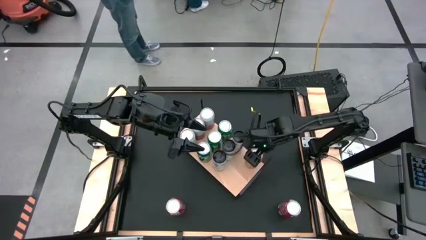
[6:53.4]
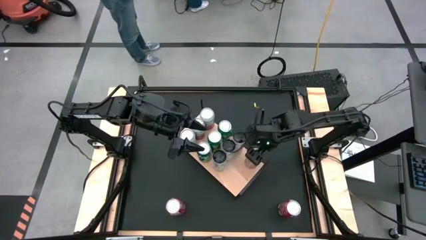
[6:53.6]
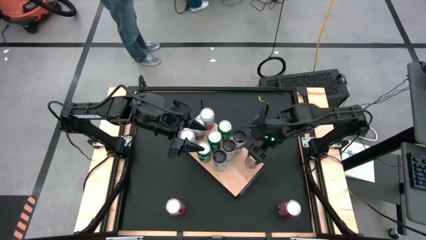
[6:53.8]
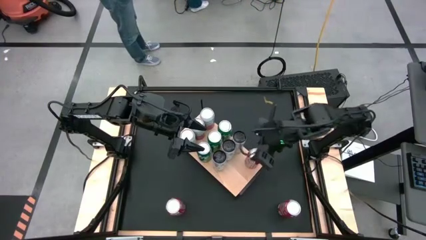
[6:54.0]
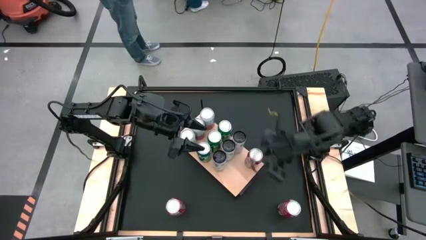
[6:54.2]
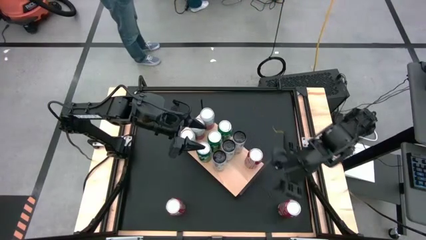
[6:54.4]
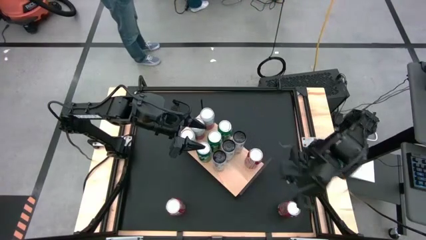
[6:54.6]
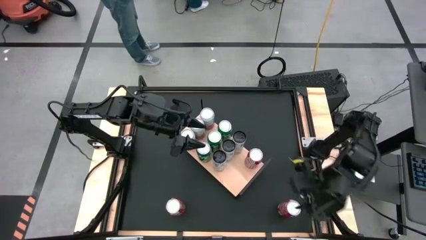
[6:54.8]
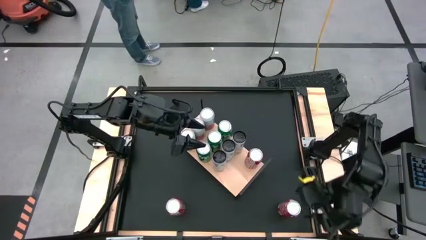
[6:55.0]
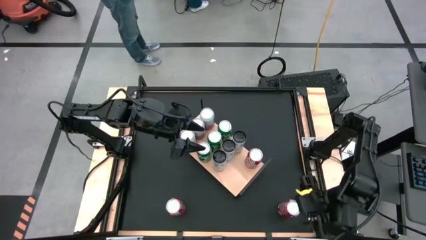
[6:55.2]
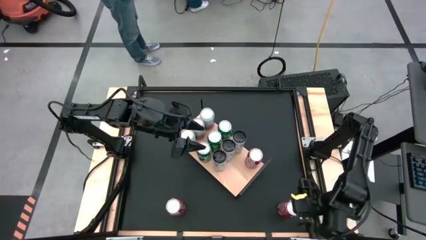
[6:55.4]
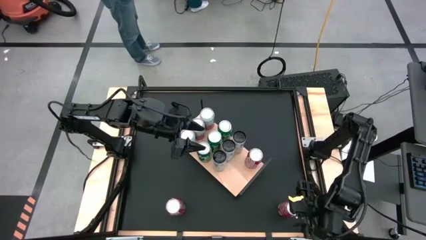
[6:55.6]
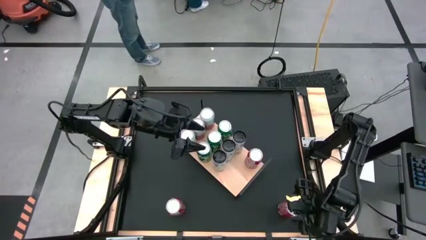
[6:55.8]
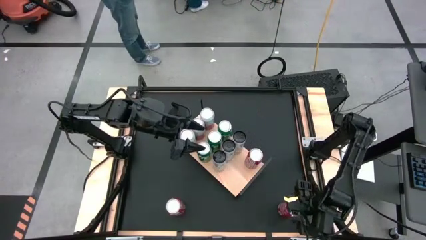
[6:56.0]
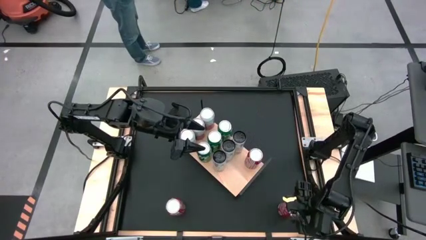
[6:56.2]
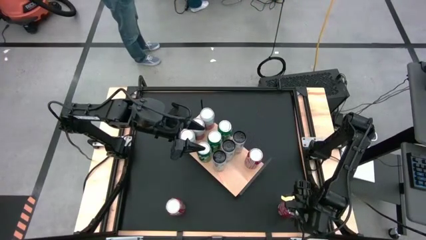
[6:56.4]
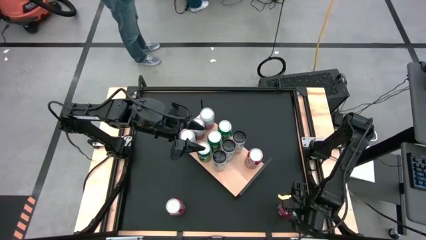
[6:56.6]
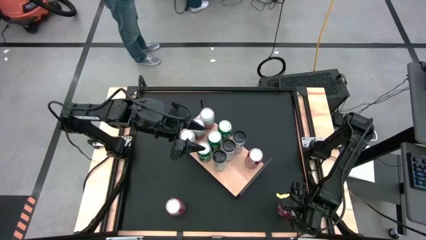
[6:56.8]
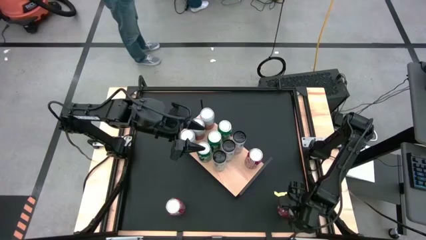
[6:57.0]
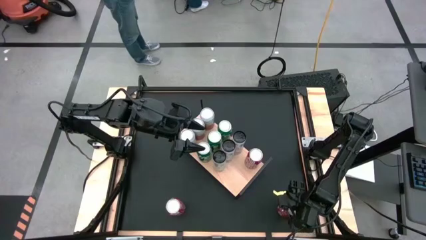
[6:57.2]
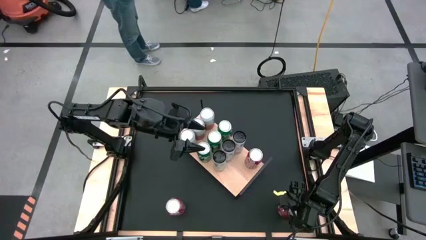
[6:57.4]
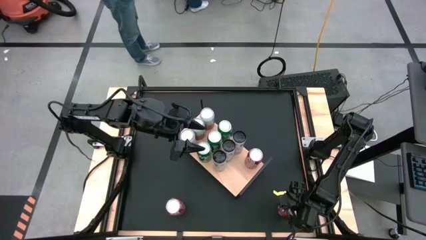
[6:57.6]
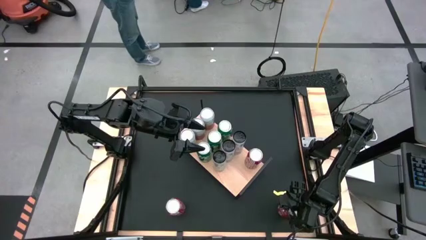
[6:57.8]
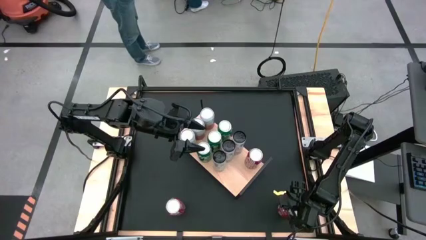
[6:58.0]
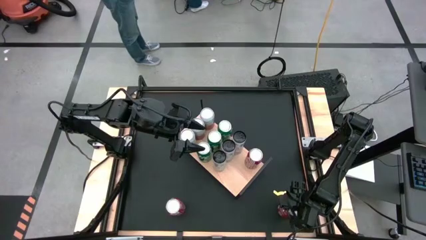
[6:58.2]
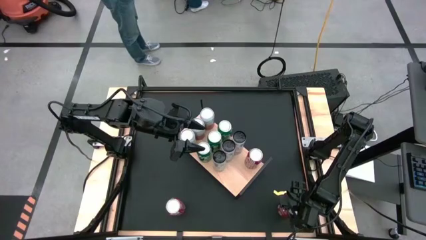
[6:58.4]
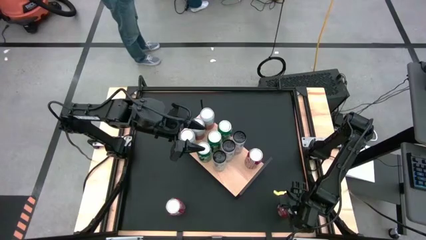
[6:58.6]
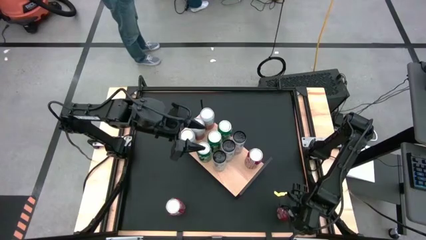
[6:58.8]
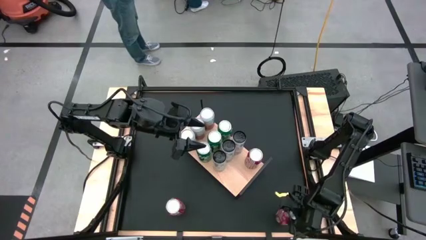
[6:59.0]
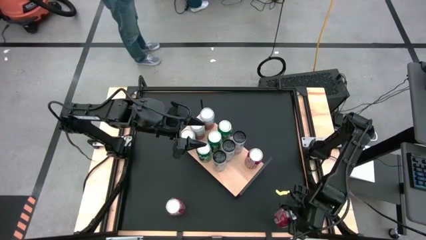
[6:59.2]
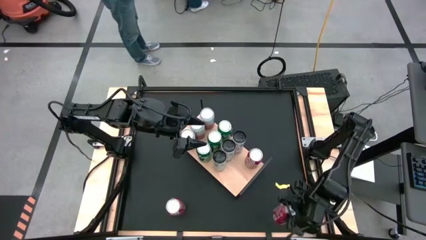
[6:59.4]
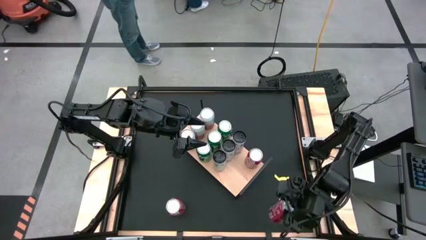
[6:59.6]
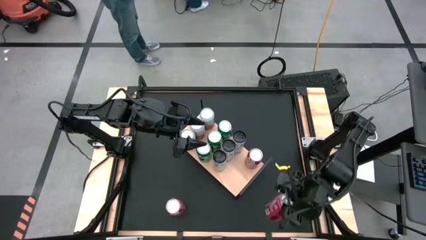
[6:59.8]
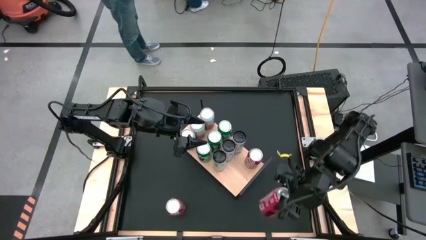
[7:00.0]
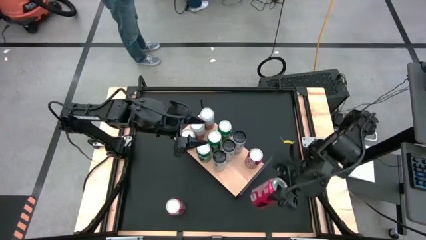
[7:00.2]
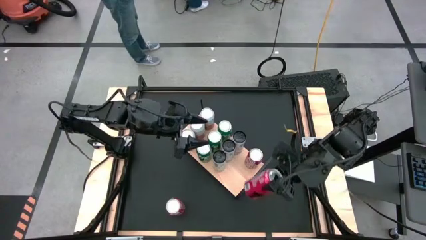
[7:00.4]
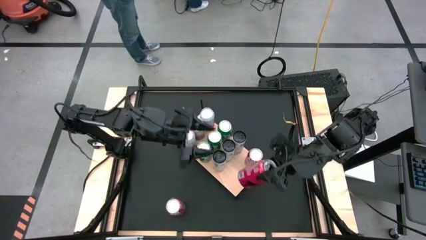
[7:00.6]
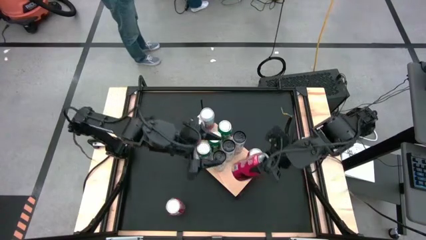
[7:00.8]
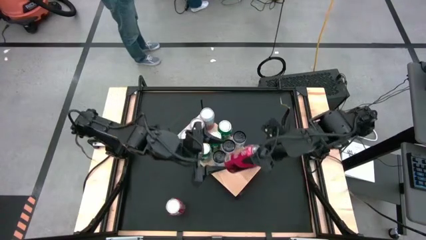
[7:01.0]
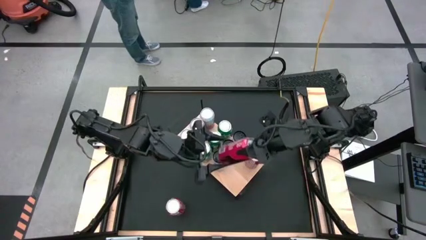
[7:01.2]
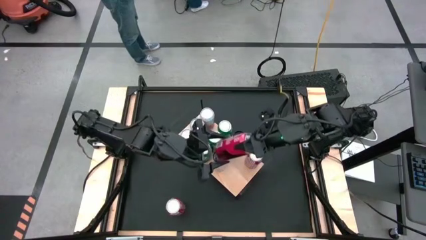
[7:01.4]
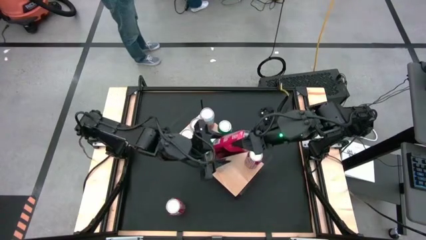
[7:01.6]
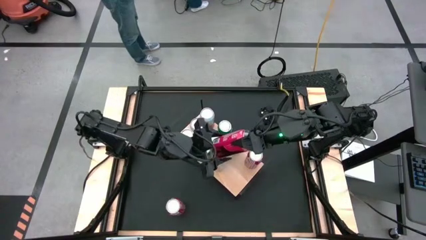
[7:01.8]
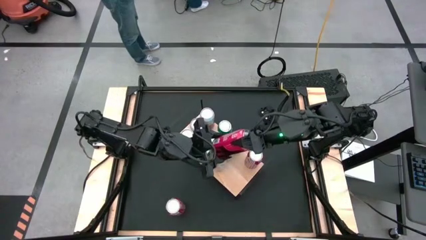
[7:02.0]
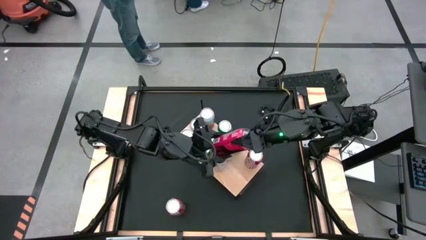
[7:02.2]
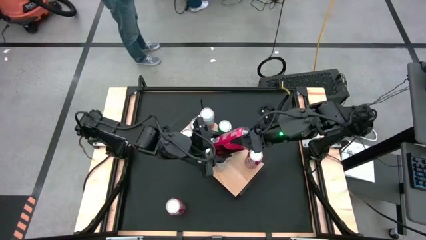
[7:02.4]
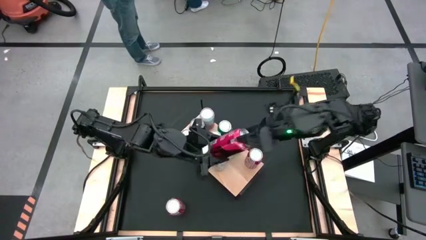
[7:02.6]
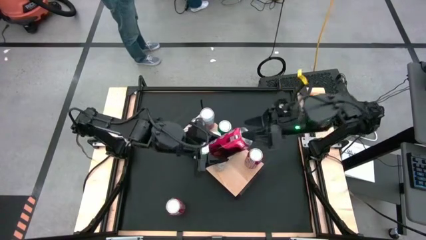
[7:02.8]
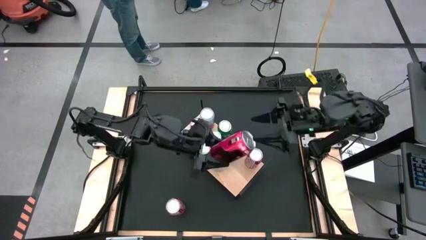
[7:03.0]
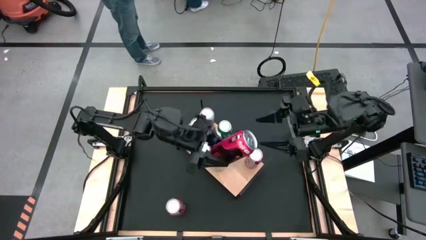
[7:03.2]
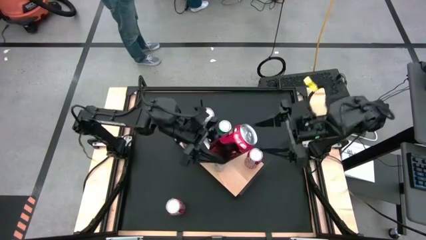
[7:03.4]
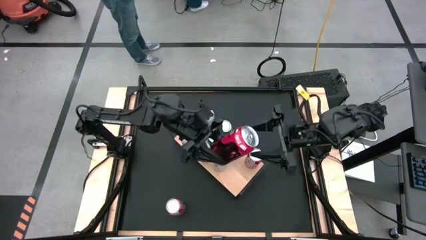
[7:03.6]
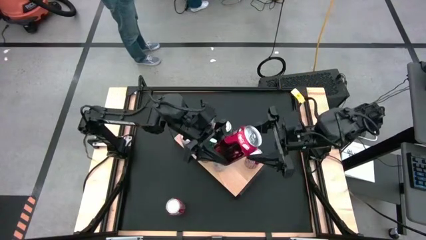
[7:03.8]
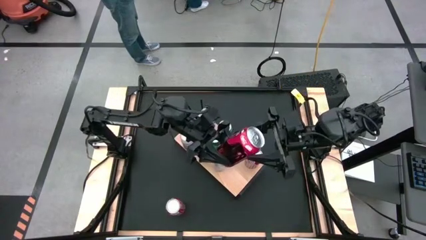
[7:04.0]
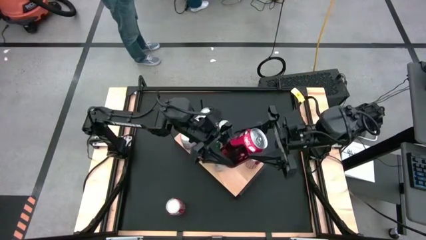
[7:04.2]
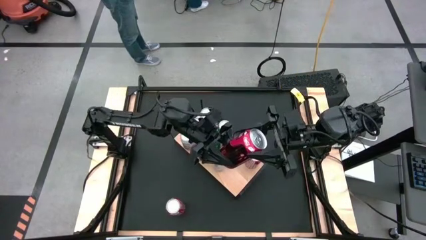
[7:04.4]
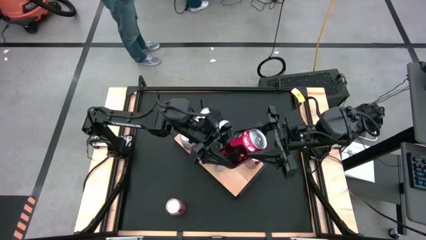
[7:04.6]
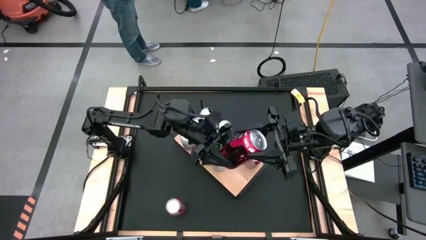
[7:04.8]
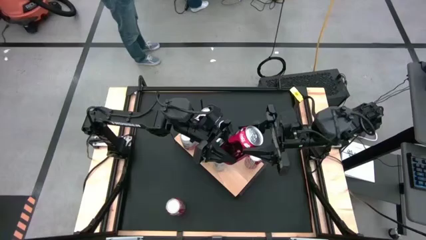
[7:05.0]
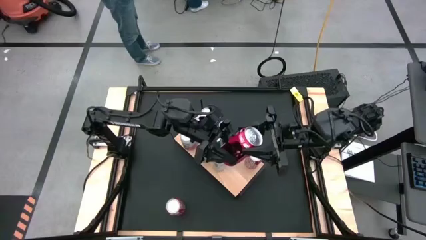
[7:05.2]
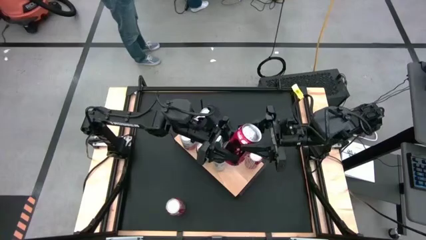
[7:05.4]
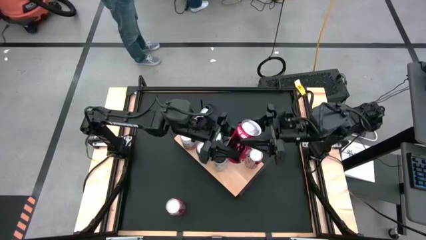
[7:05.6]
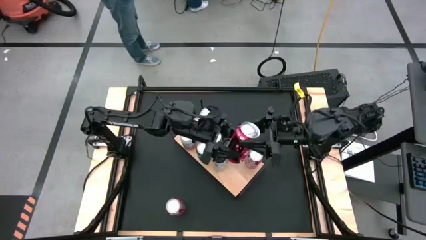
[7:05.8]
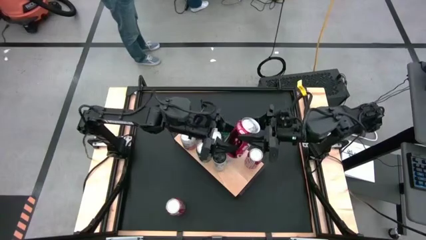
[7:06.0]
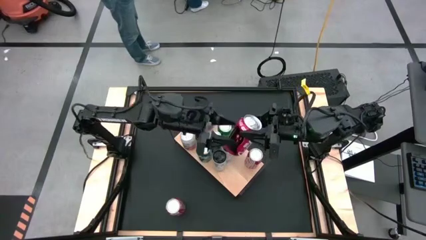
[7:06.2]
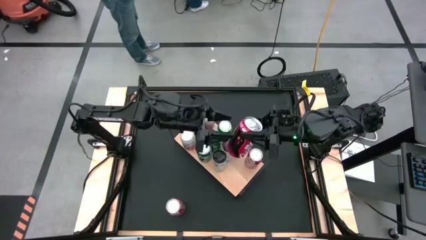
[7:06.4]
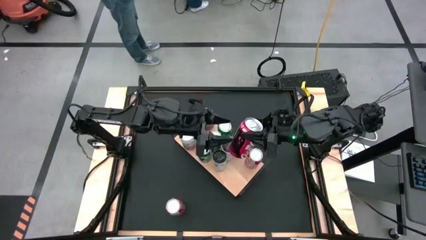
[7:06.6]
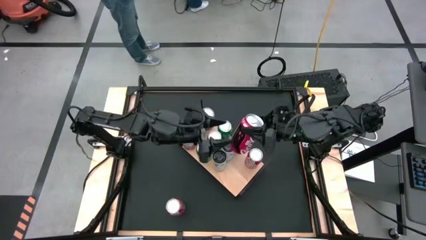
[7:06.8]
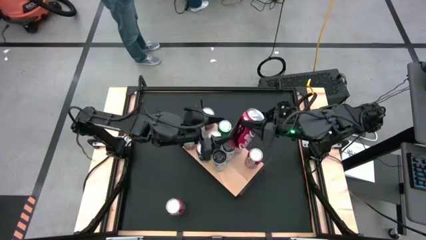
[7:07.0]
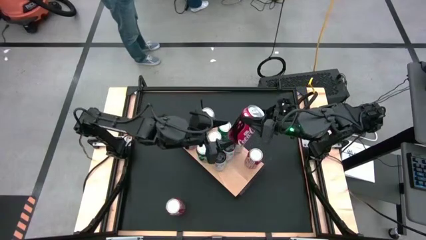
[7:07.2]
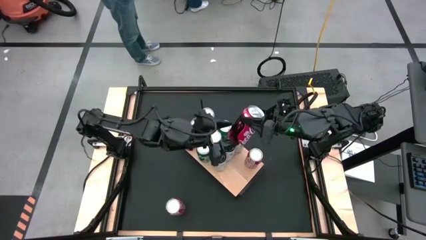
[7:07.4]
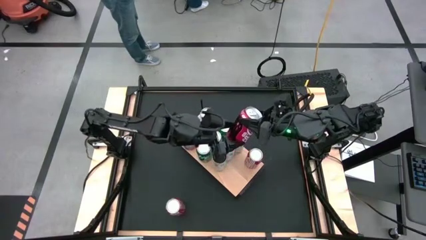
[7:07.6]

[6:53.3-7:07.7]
Task: Place canned beverage on shelf
Put the right red soda can aligned with the other red soda can
